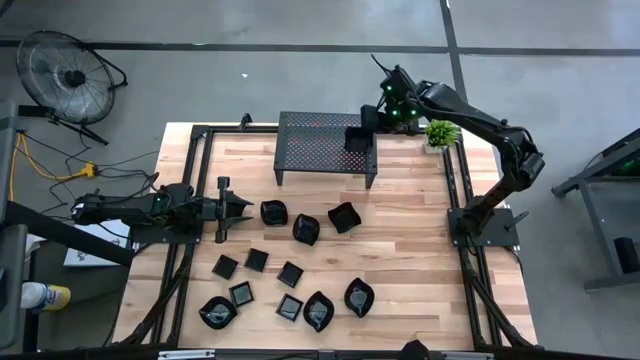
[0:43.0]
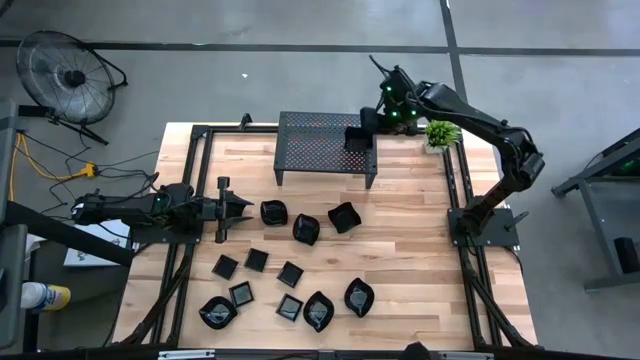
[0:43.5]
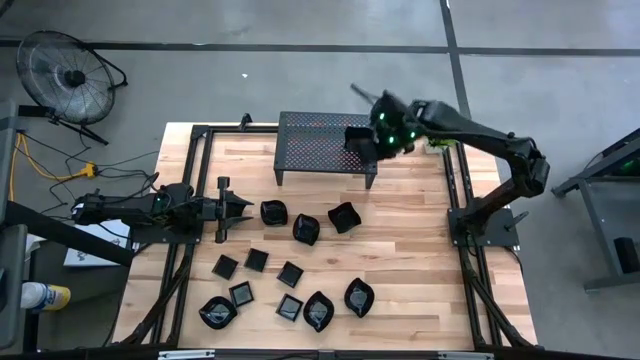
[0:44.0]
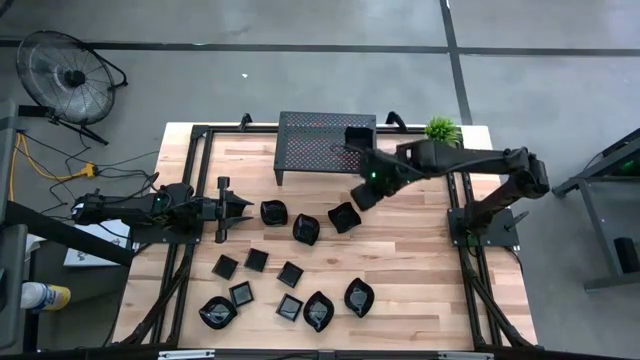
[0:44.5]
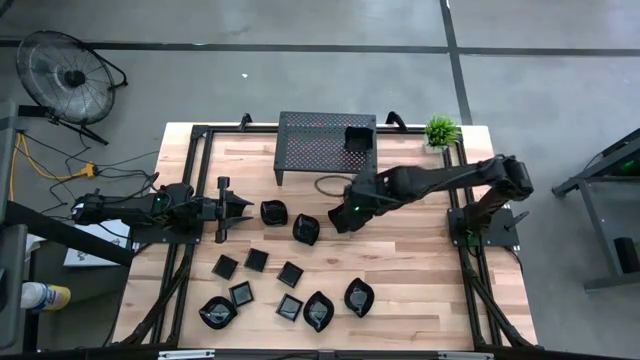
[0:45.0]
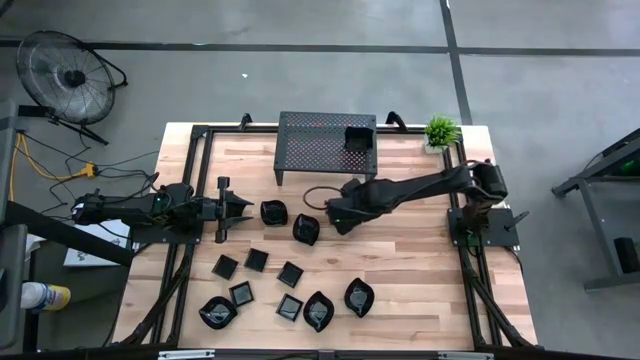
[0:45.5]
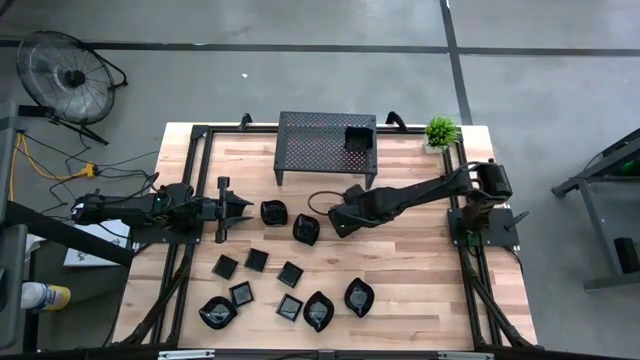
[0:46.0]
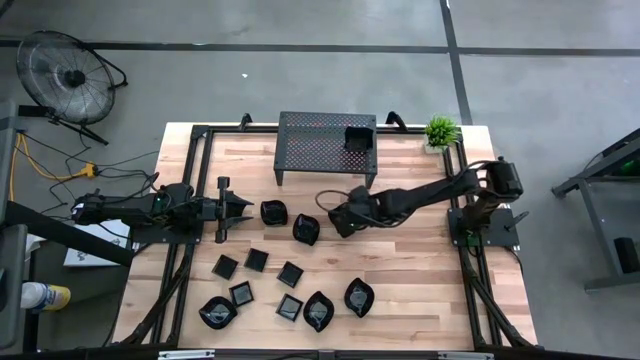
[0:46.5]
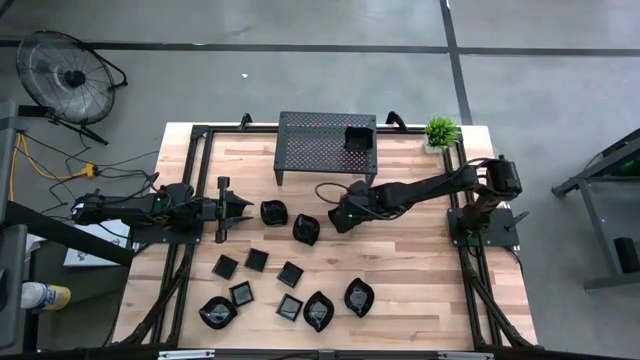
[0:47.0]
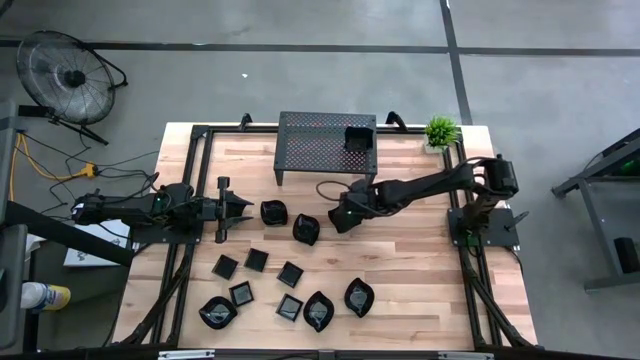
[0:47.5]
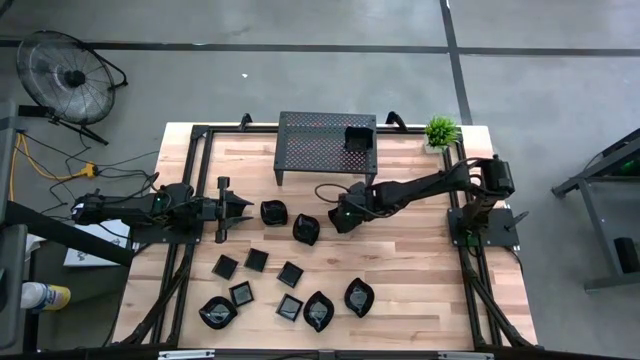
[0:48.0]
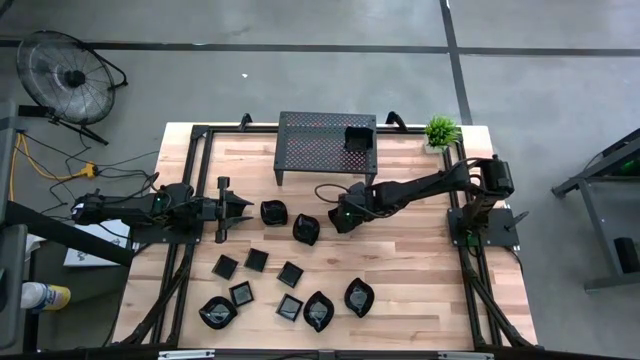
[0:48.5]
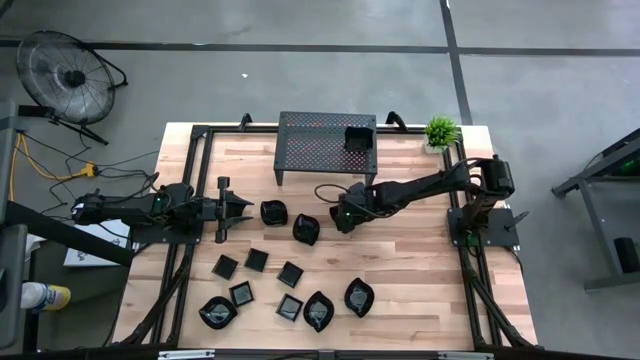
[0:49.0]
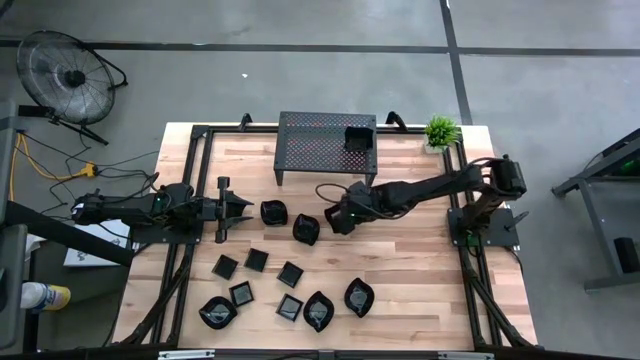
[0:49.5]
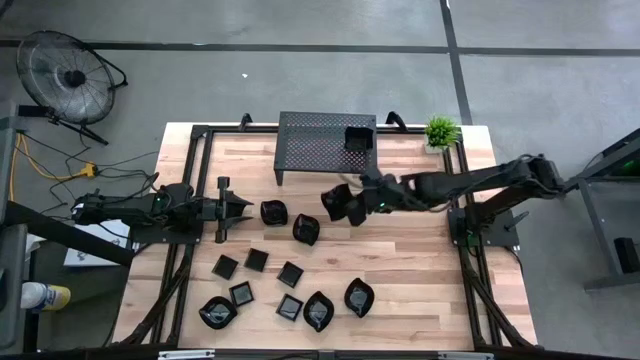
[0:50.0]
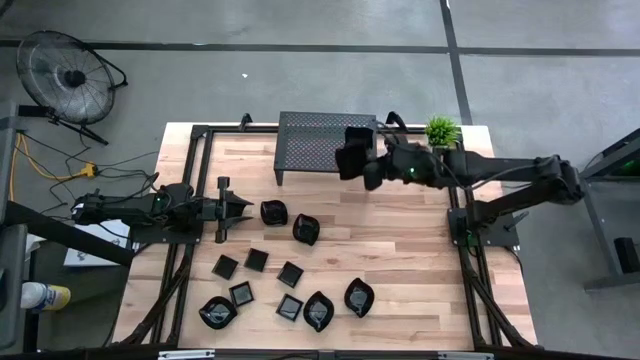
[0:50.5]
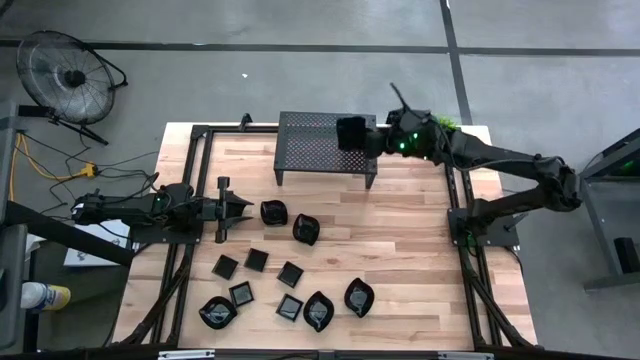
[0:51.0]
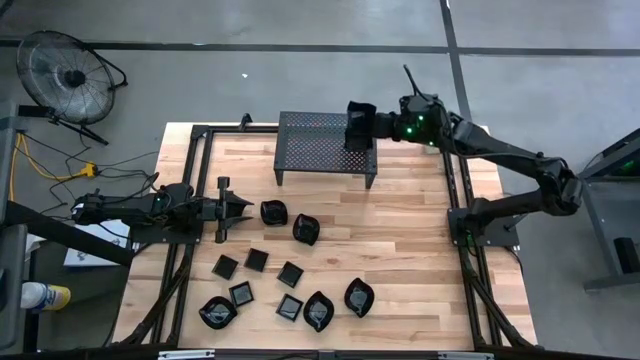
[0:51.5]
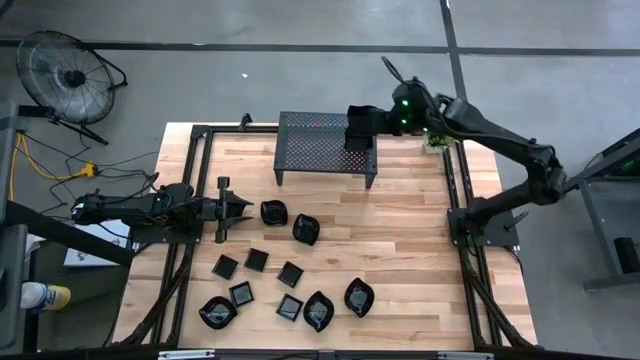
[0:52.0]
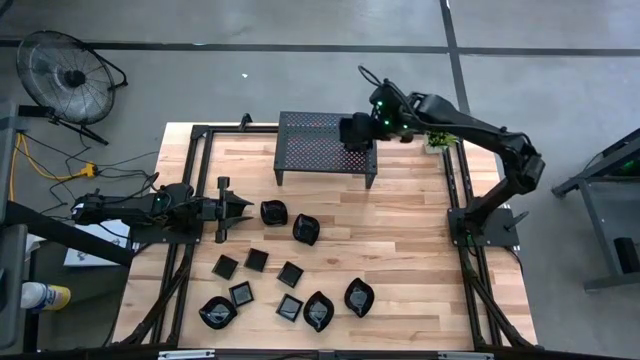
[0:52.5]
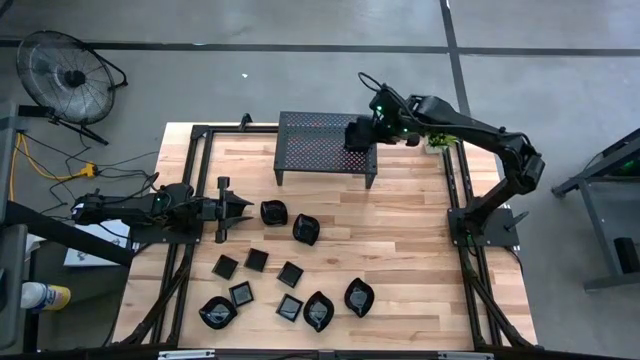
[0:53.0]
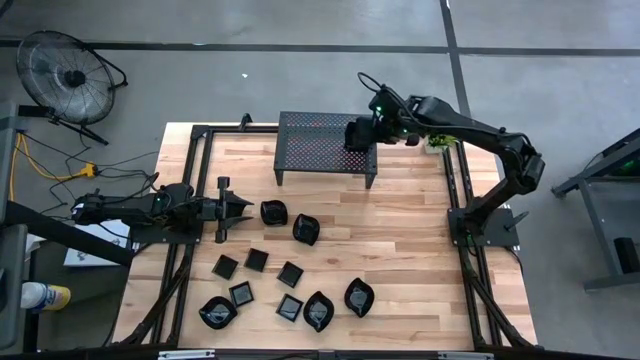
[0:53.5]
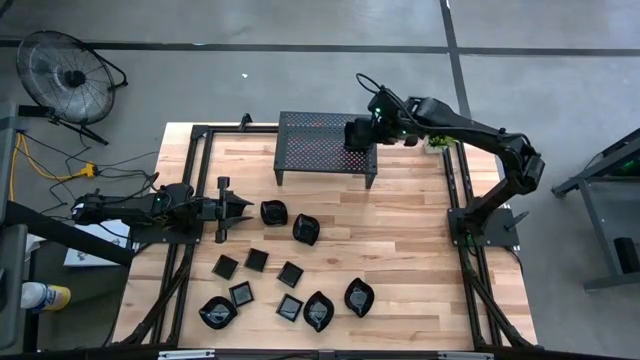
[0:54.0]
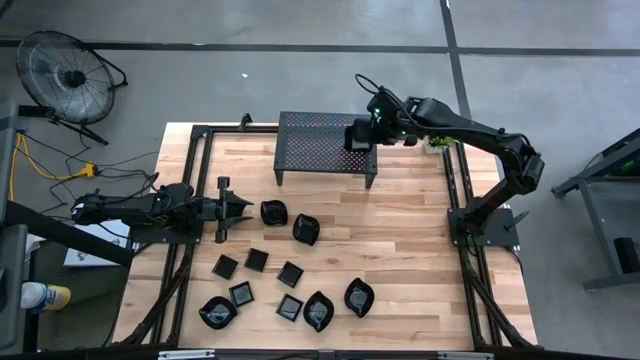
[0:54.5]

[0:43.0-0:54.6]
Task: Pick & Place Mini shaped plates
Stack the right black distorted square plate on top of the black distorted square plates on the shelf

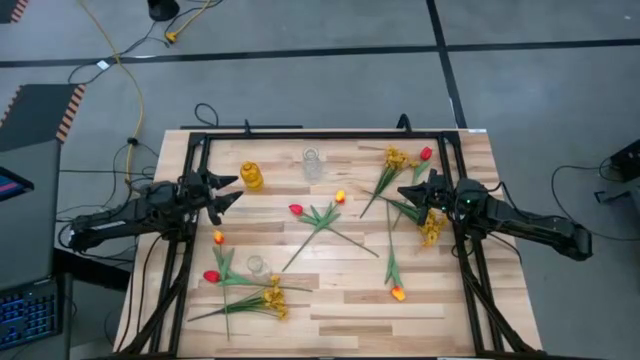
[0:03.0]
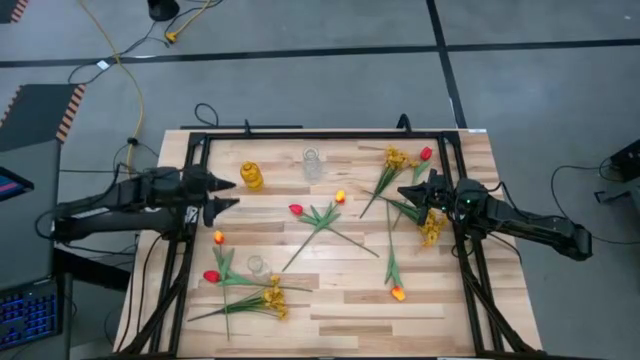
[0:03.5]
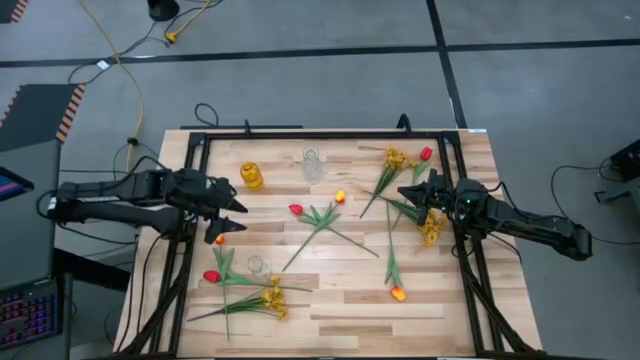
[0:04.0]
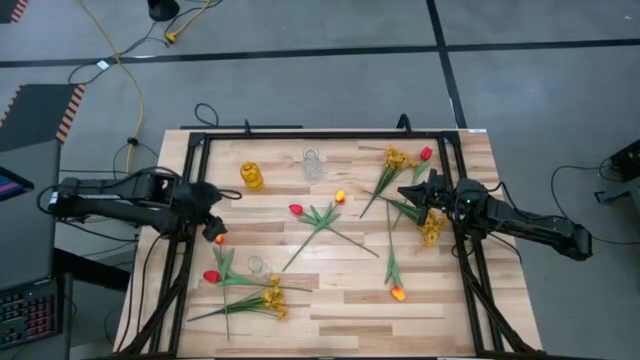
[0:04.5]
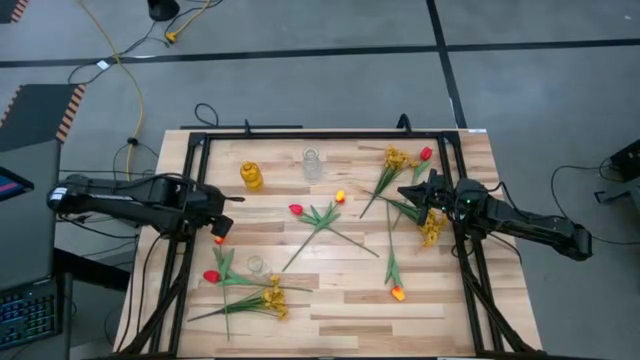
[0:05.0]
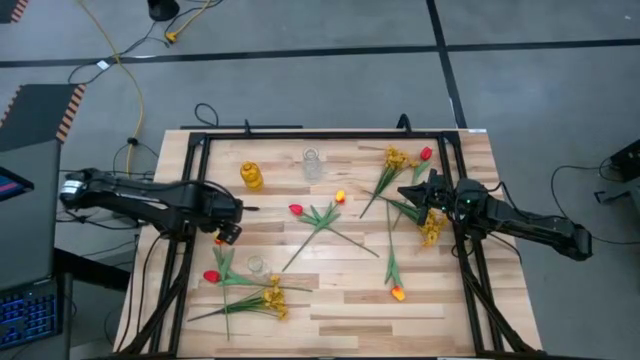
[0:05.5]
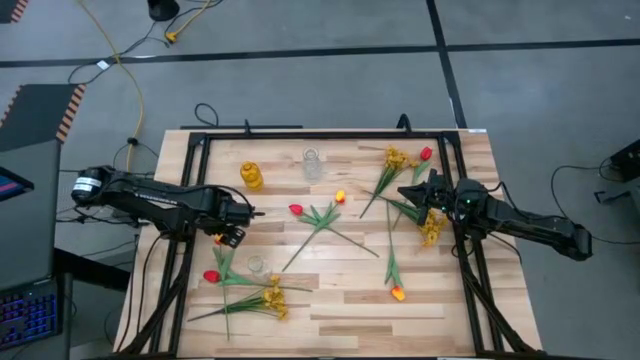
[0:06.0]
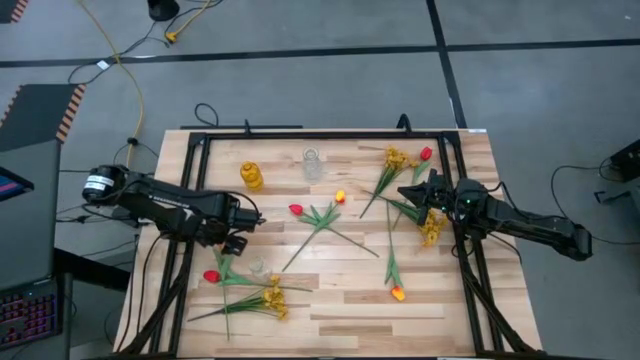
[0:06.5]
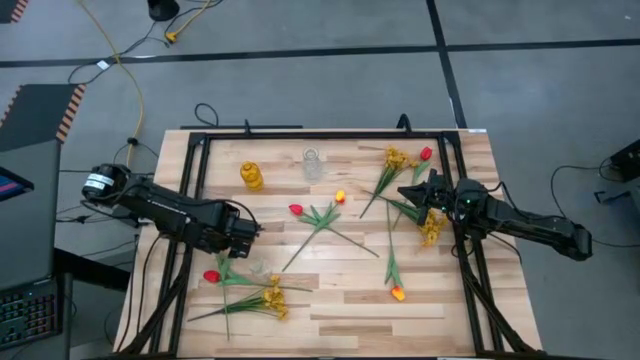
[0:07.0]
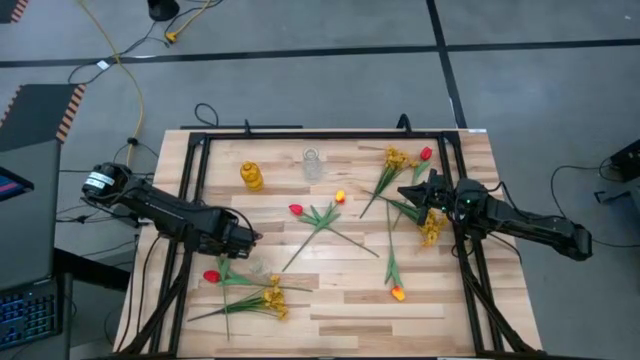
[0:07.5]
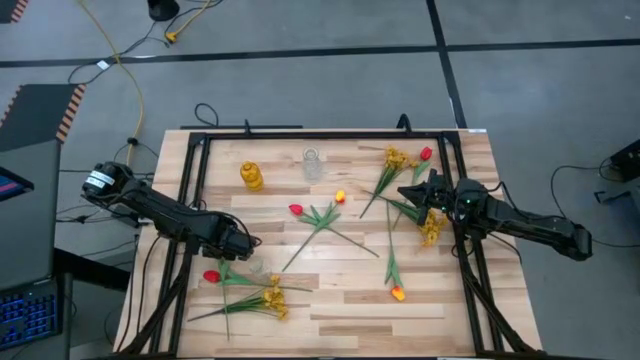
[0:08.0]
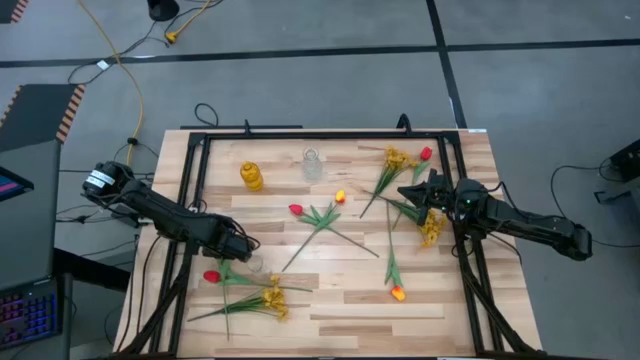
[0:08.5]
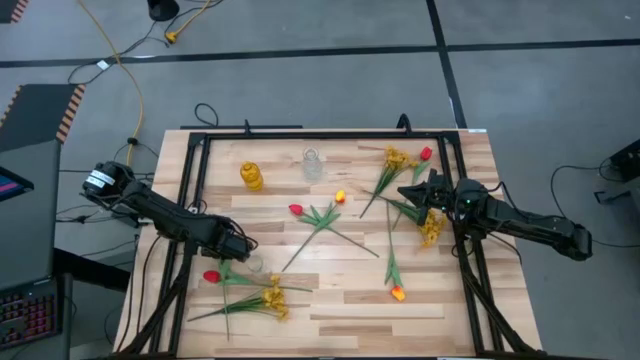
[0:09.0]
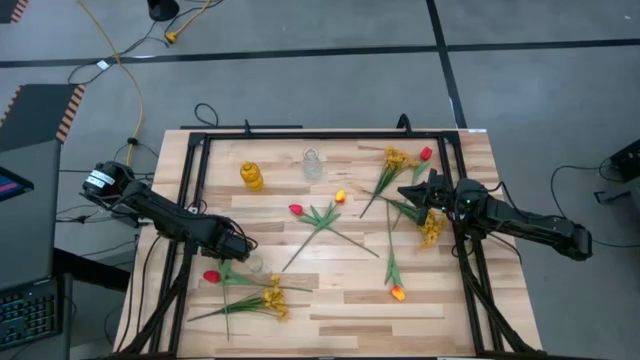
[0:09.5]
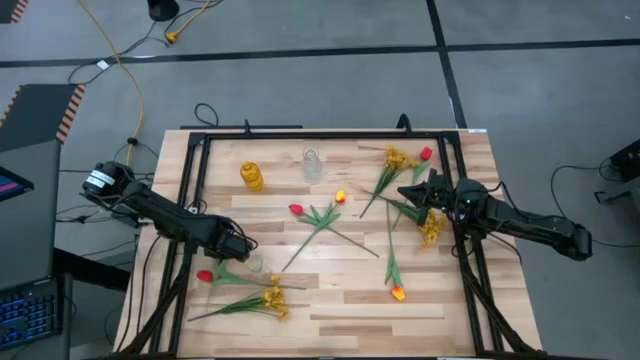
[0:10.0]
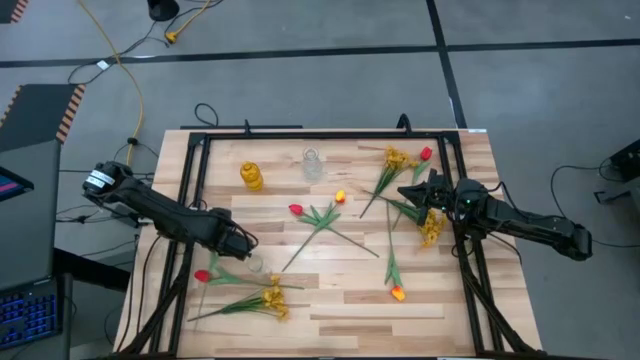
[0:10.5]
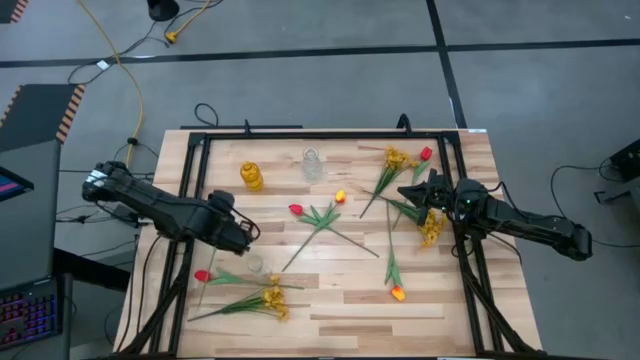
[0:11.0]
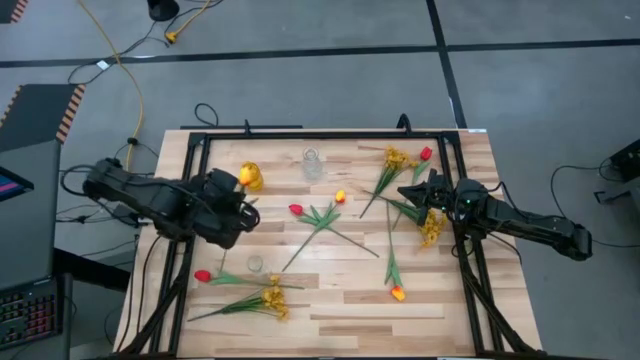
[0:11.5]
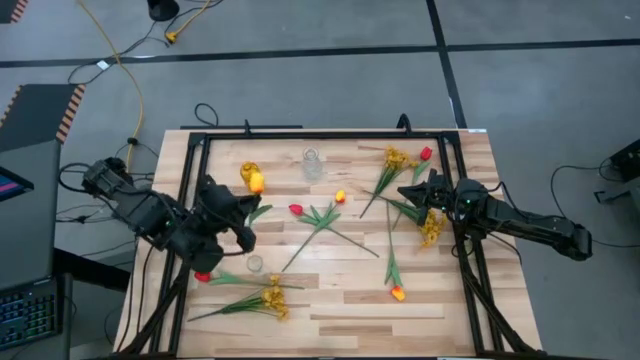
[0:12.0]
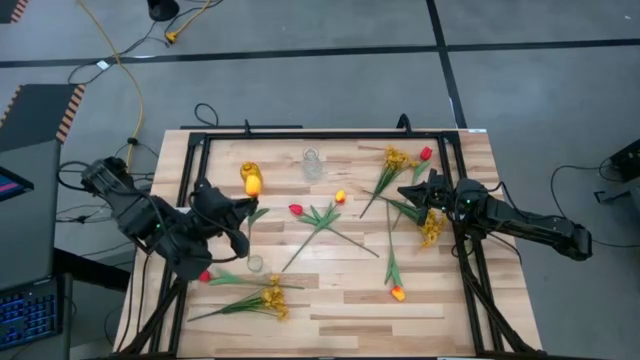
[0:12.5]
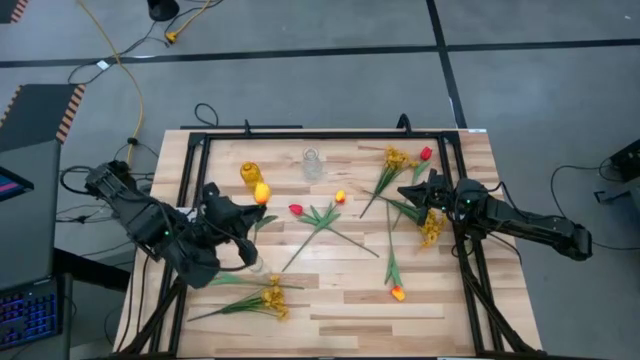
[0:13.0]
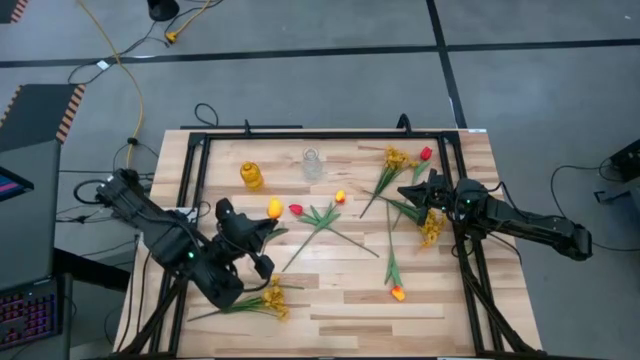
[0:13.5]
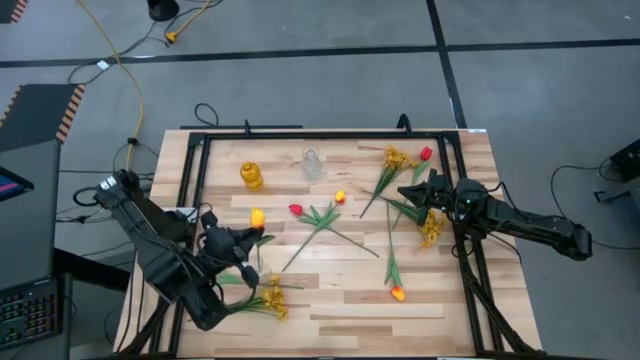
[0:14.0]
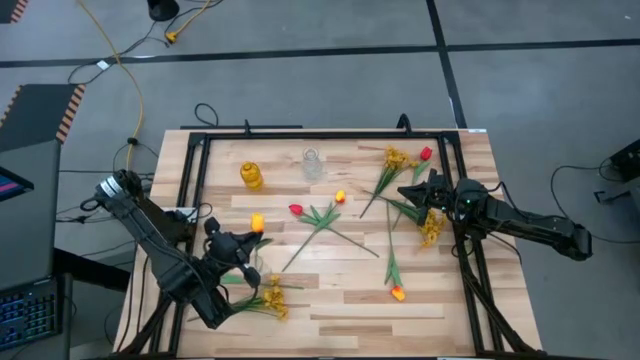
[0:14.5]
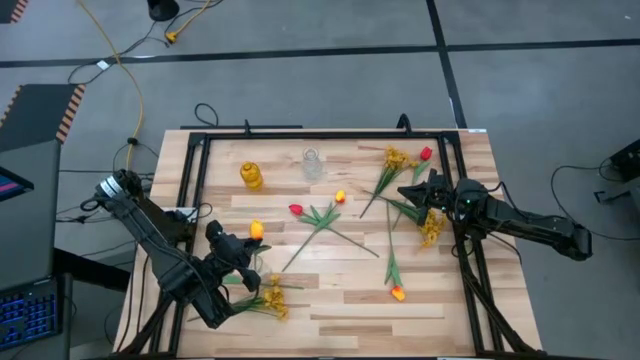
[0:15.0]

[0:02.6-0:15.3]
Task: Sort flowers into vase by color
Put the left yellow flower into the bottom transparent vase
